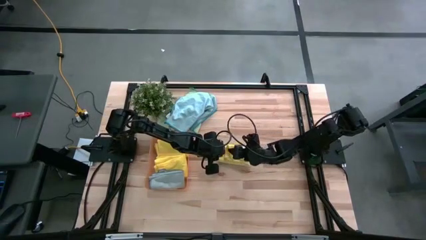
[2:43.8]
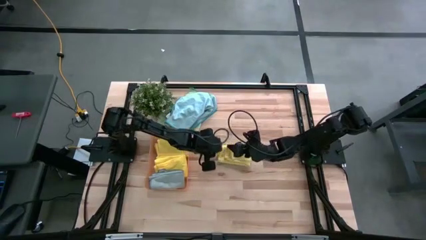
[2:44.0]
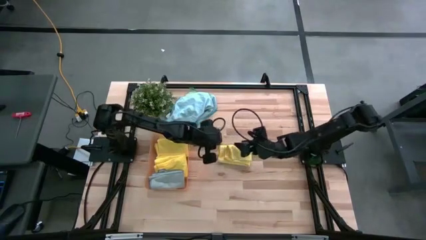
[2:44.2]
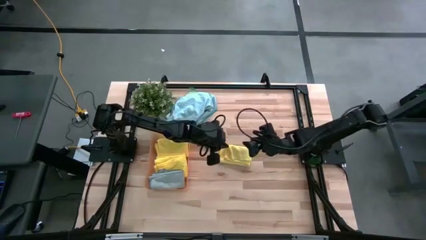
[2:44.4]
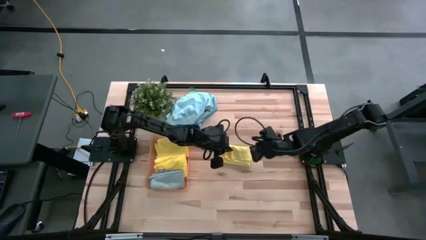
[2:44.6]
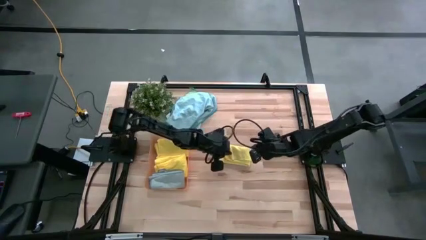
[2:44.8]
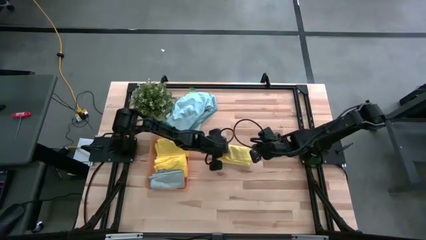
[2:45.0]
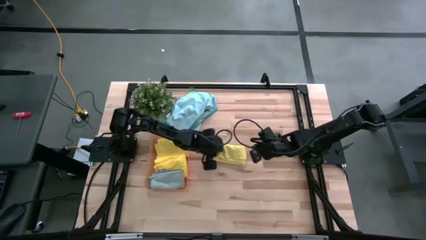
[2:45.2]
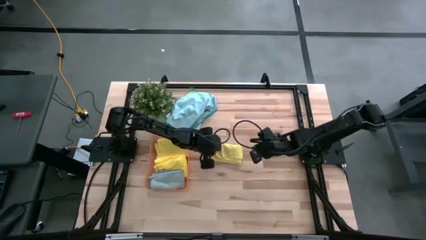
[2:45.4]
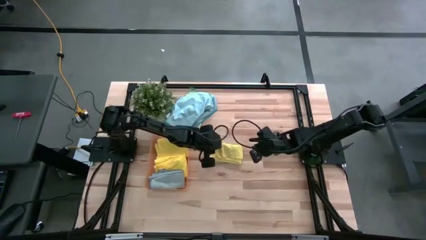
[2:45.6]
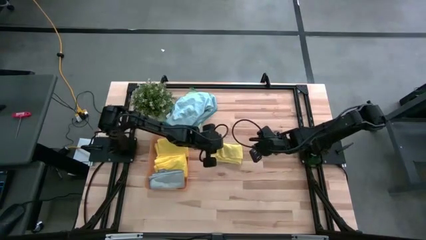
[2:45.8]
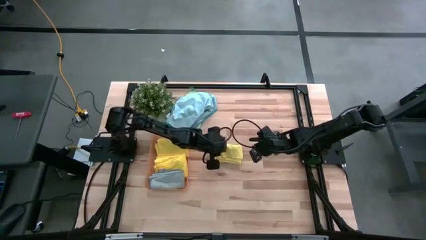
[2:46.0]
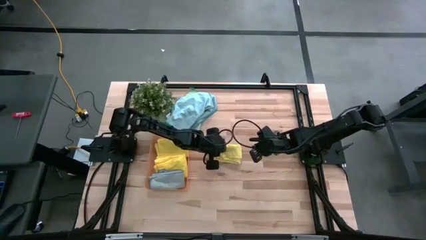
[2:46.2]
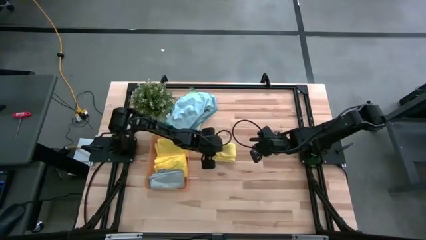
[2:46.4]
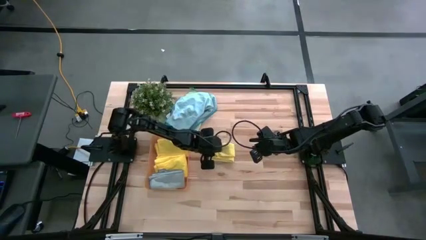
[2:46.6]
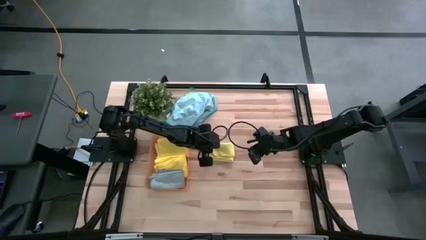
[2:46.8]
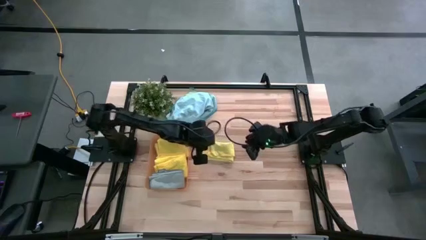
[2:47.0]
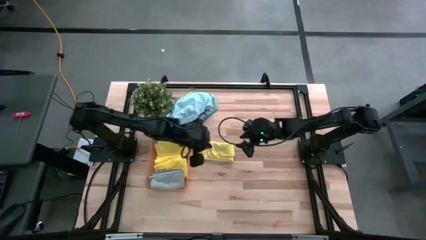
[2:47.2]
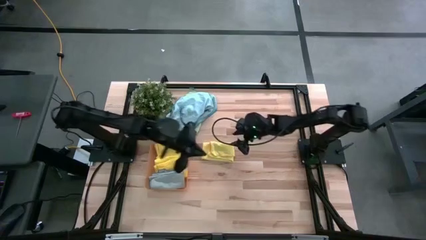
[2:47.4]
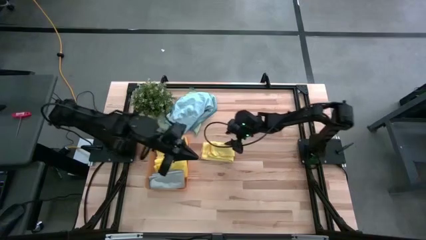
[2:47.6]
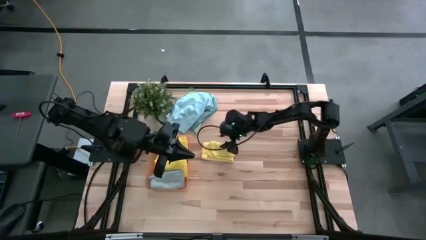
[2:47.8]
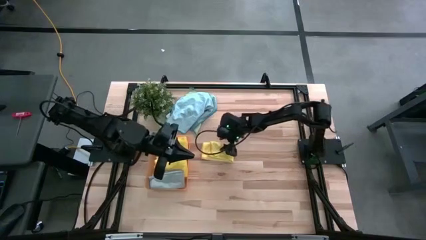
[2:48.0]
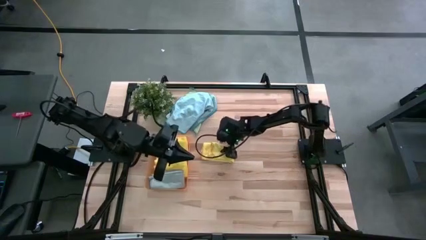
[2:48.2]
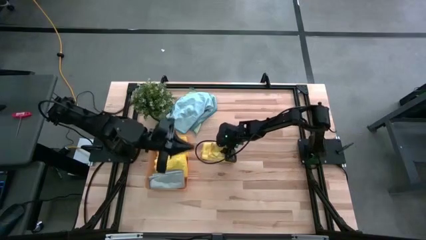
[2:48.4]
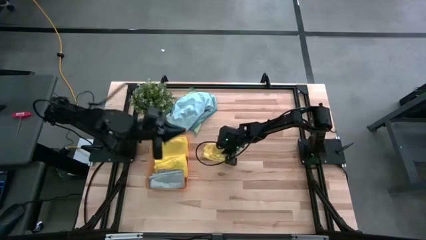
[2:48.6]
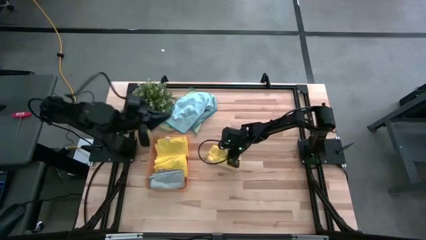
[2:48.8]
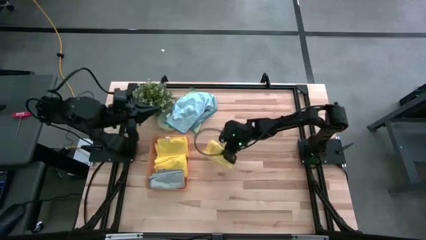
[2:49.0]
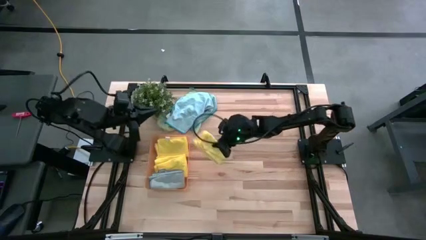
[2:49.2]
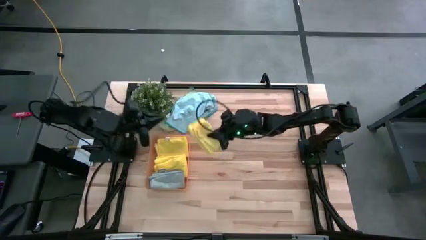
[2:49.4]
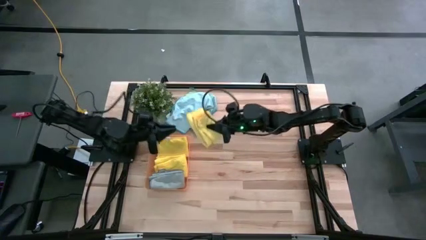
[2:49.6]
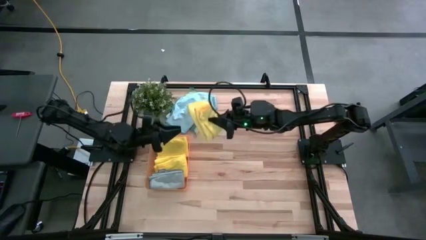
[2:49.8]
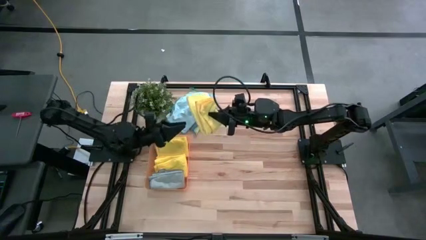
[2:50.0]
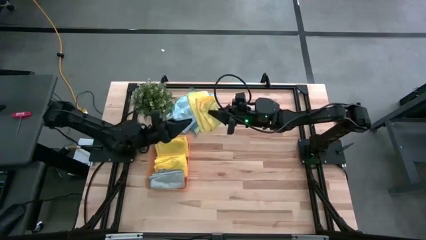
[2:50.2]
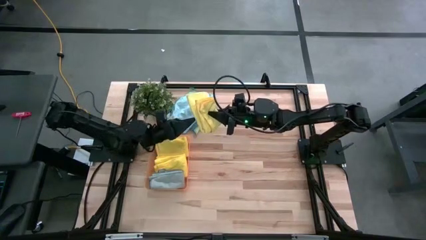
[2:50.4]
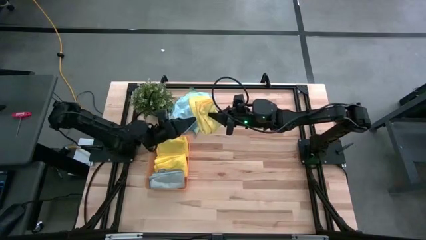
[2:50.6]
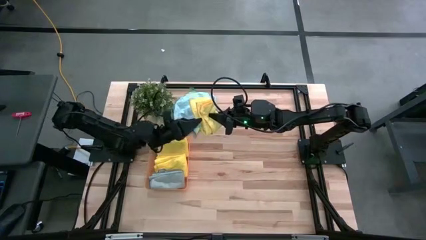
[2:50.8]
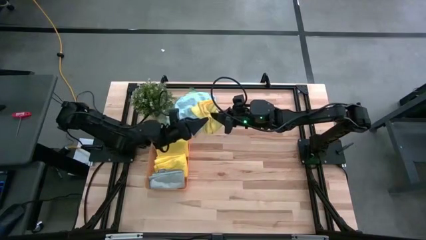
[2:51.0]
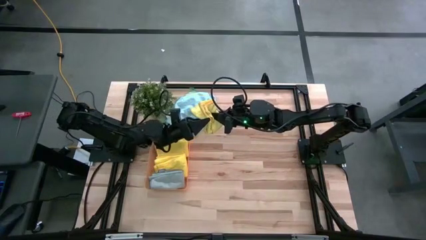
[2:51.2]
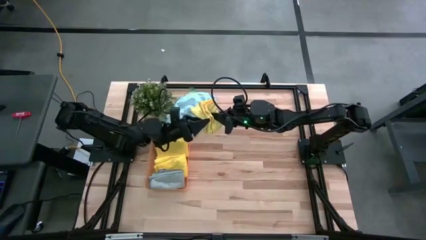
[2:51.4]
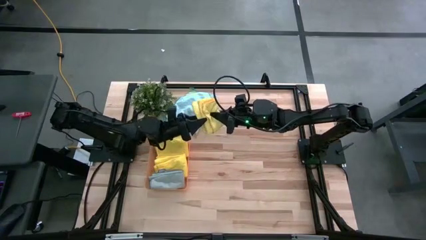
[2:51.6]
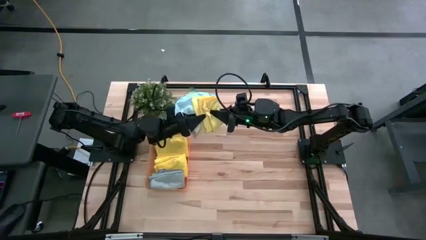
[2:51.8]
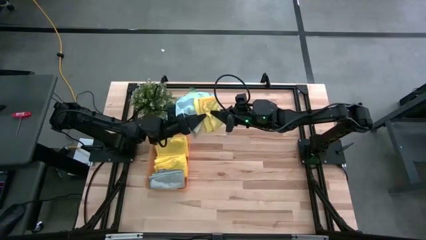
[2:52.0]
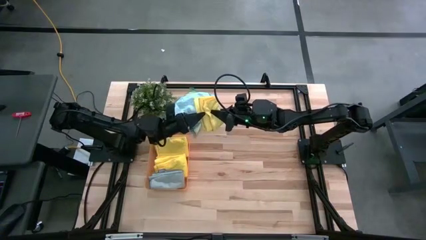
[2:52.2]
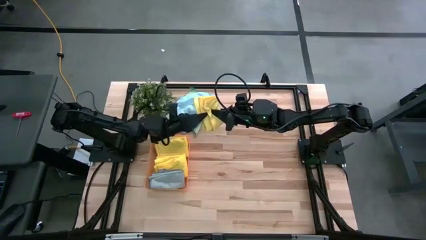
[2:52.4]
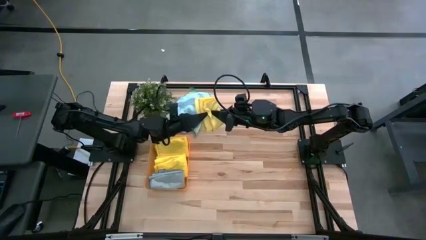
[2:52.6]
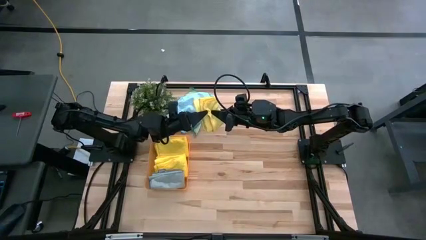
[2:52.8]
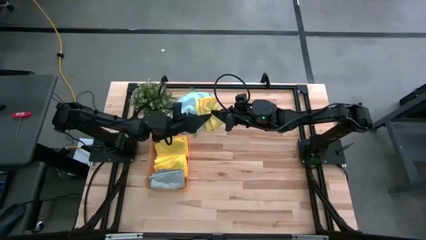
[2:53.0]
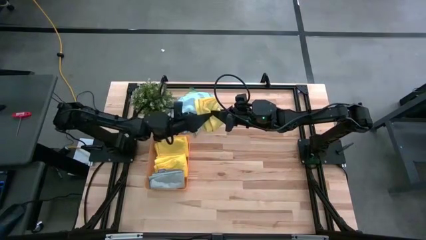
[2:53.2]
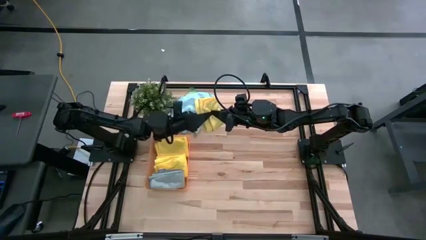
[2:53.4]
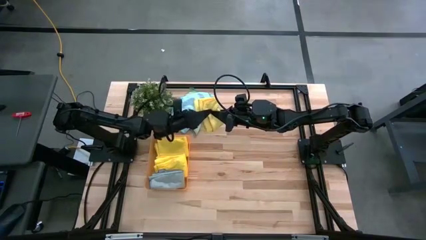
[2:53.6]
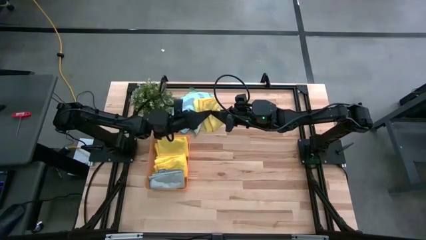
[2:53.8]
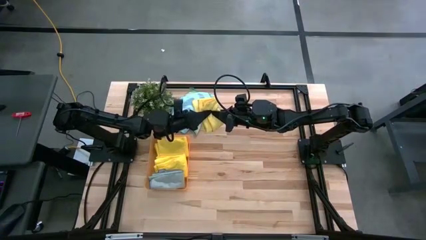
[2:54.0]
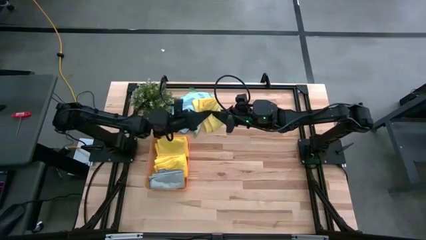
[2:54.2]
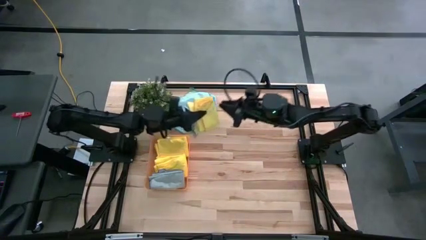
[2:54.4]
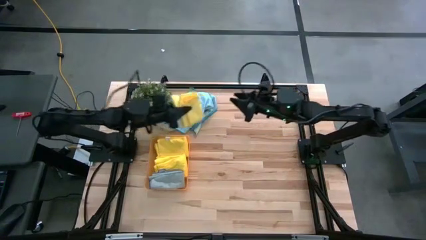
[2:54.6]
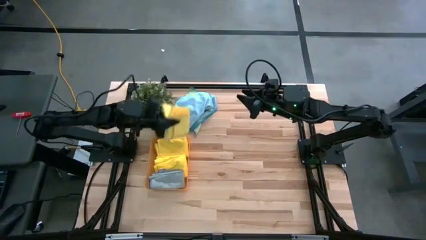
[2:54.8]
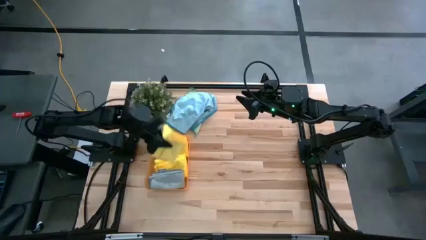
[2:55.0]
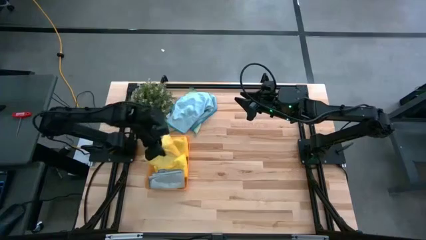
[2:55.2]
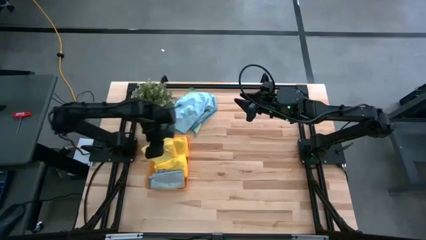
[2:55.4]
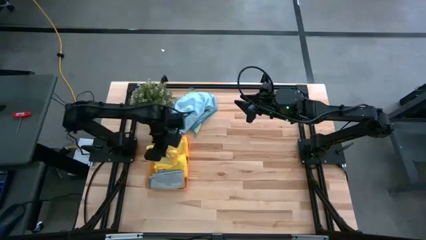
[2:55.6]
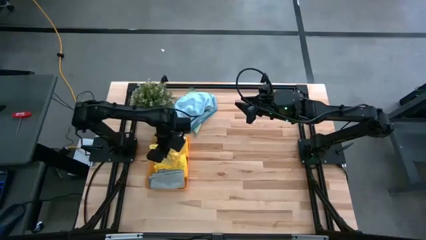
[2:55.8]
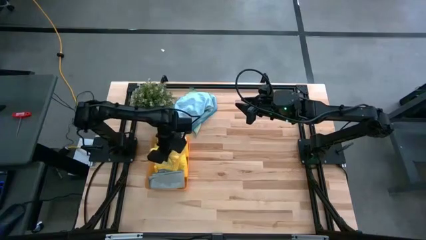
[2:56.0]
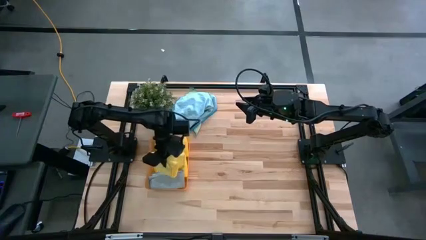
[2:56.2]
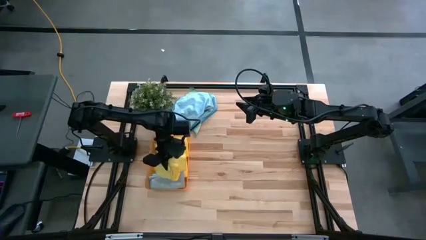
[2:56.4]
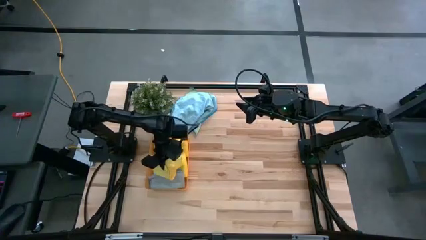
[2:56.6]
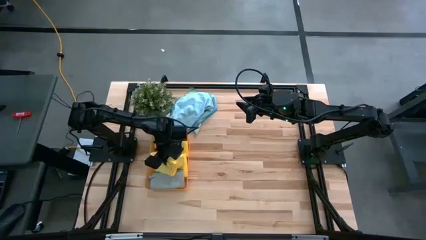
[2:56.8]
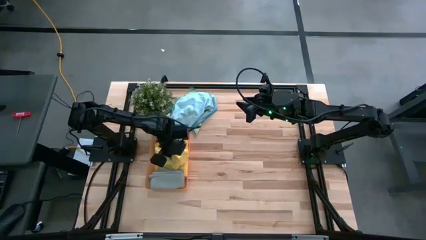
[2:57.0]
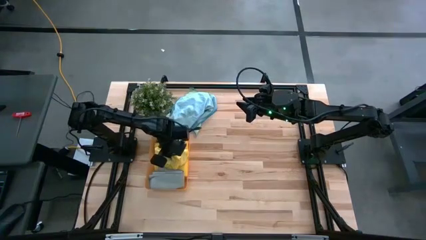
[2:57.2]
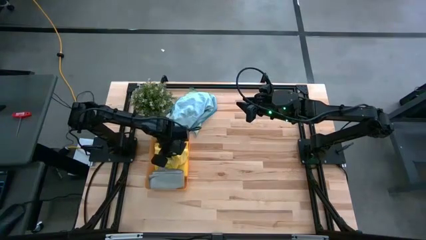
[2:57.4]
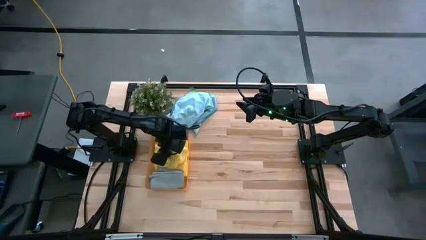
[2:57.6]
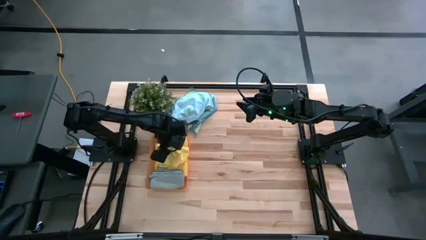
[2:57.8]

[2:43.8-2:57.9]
Task: Fold microfiber towels
Put the yellow folded microfiber towel into the orange bin
